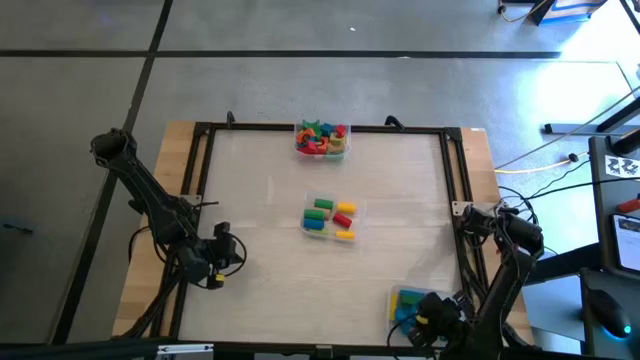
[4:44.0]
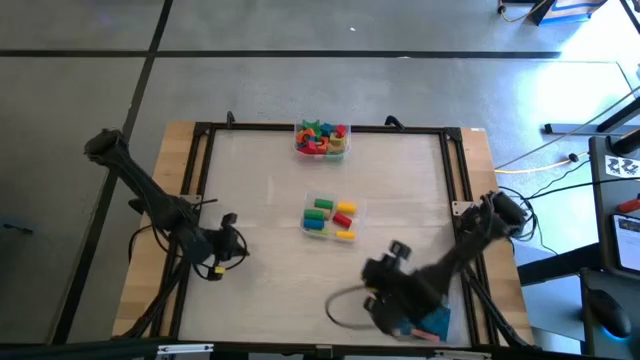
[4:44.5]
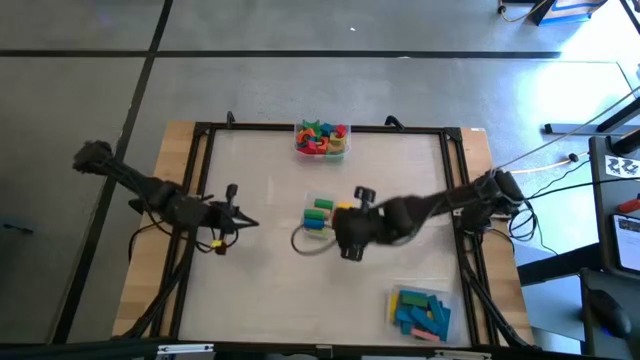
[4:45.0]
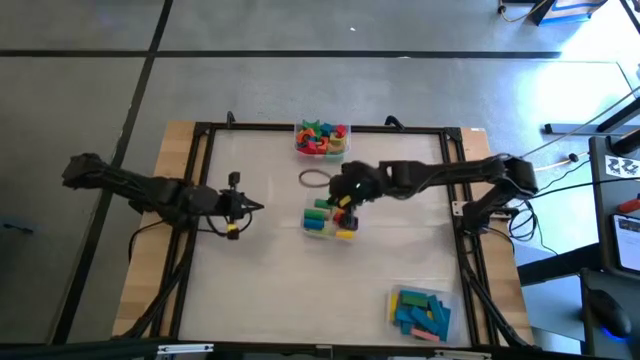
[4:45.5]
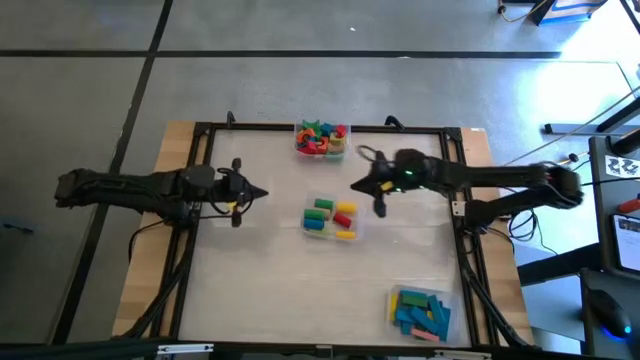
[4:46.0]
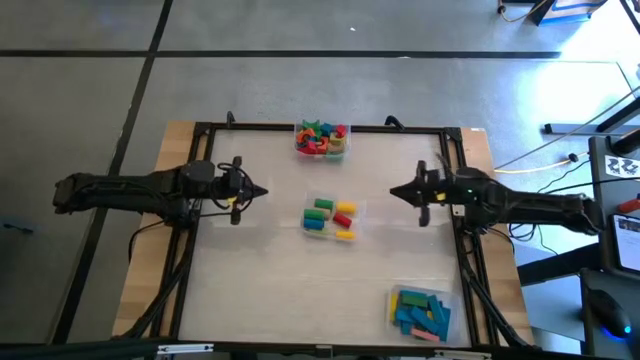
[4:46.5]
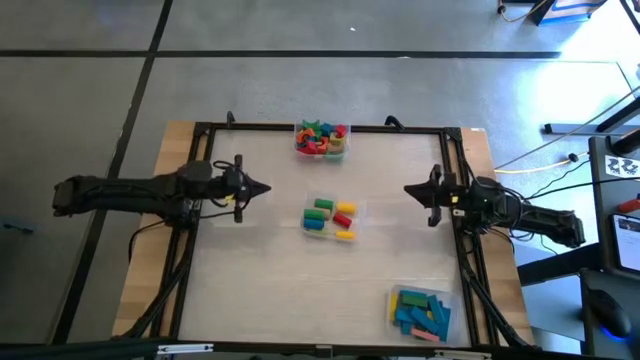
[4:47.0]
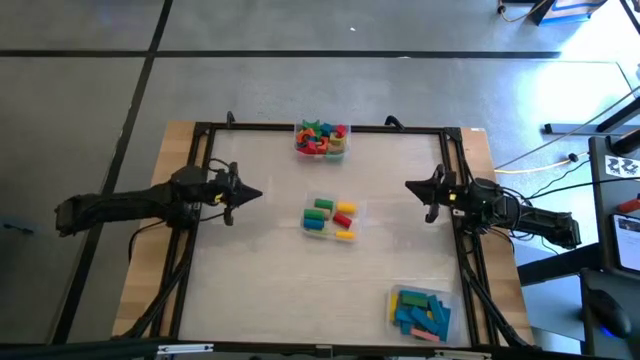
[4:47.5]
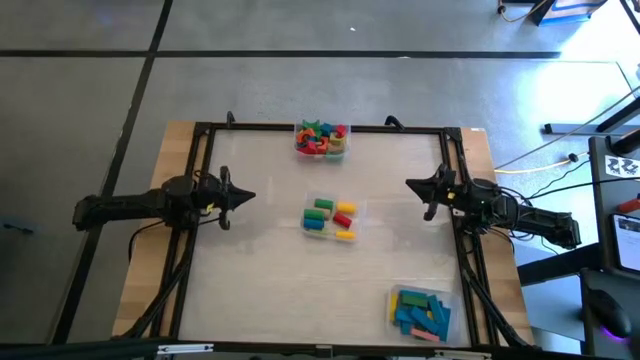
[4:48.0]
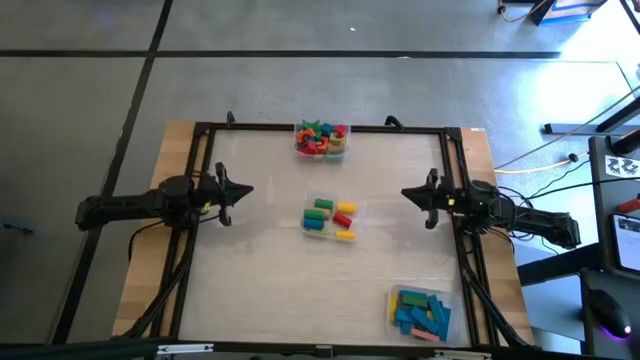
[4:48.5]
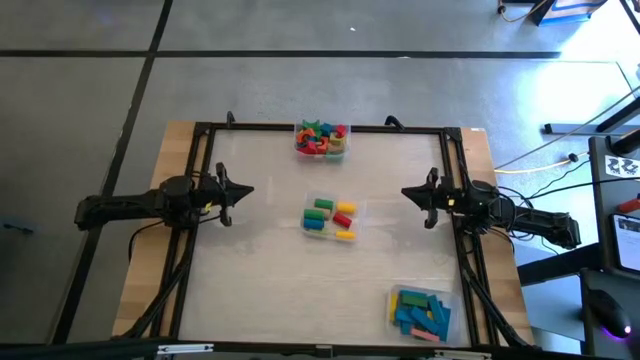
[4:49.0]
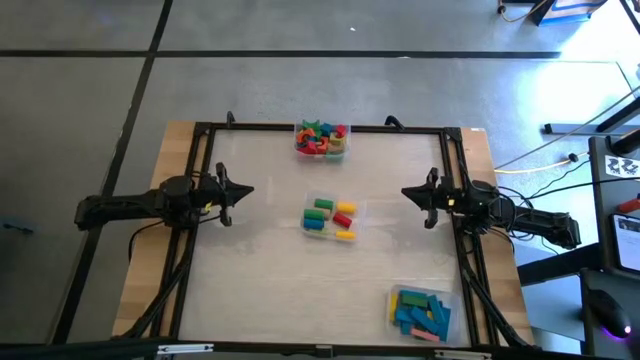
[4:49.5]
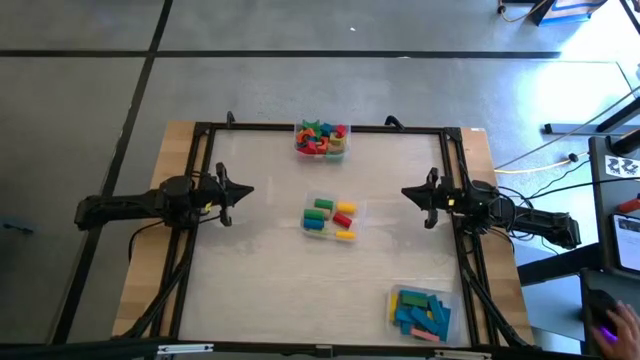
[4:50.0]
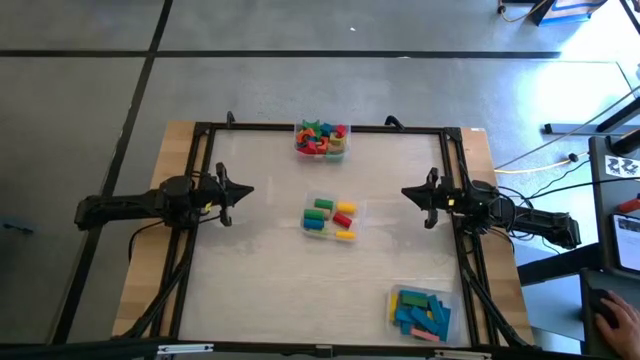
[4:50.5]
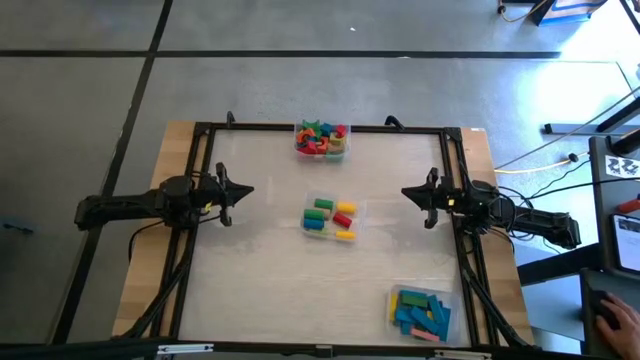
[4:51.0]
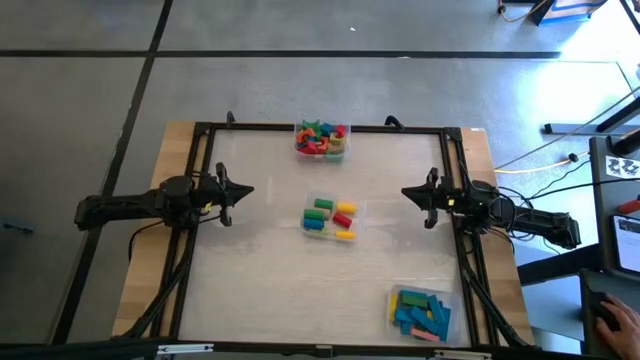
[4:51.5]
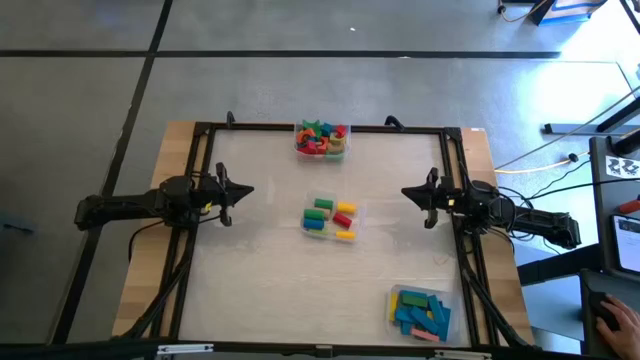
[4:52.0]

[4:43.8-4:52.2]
Task: Sort blocks by size
Return to Home Position

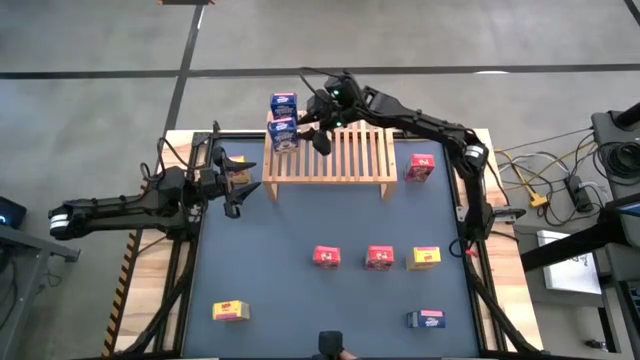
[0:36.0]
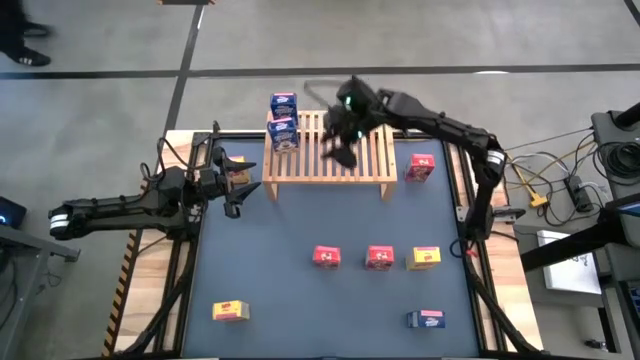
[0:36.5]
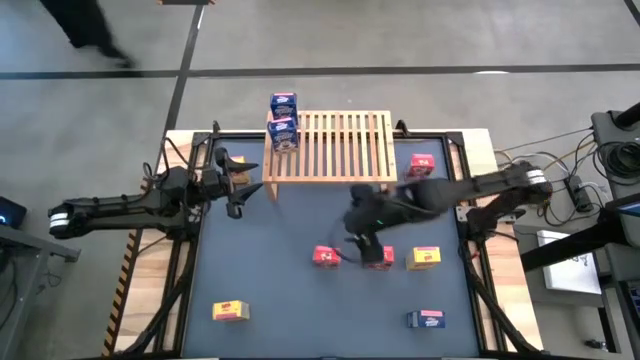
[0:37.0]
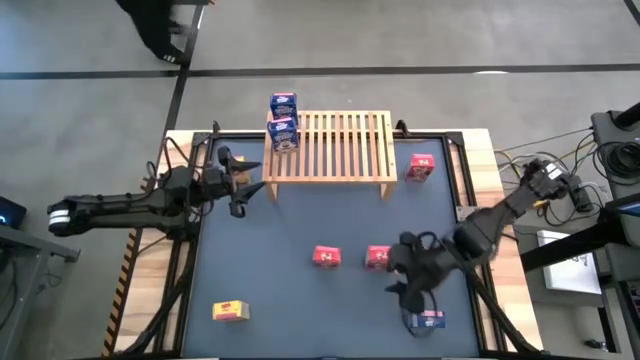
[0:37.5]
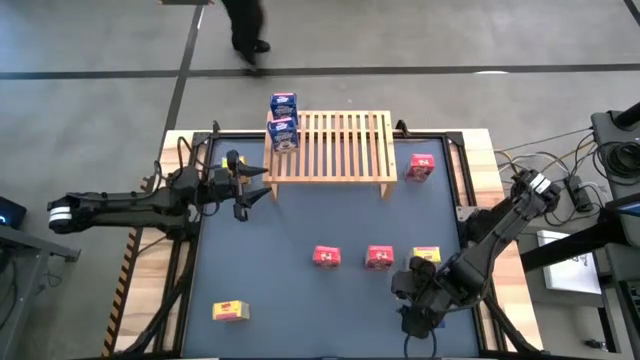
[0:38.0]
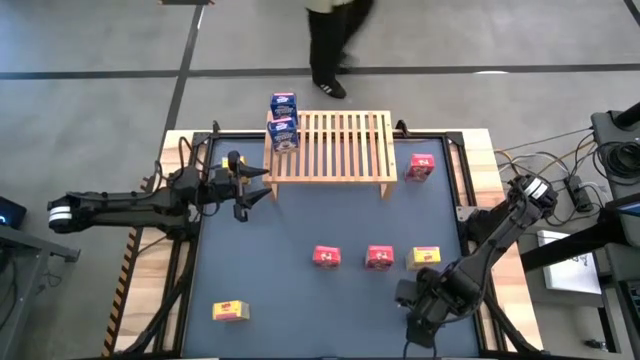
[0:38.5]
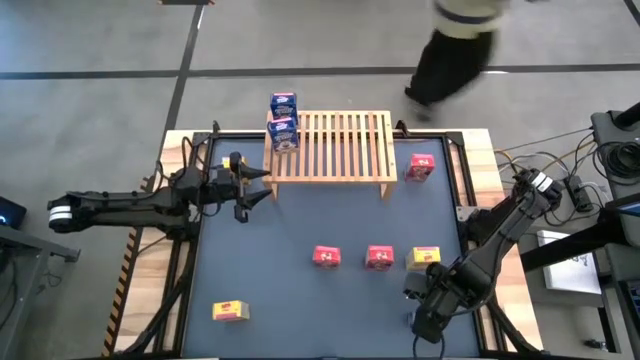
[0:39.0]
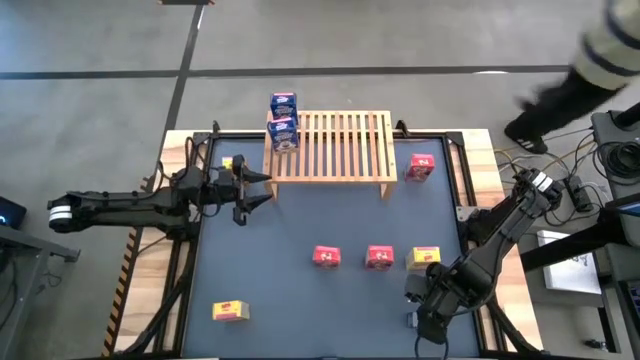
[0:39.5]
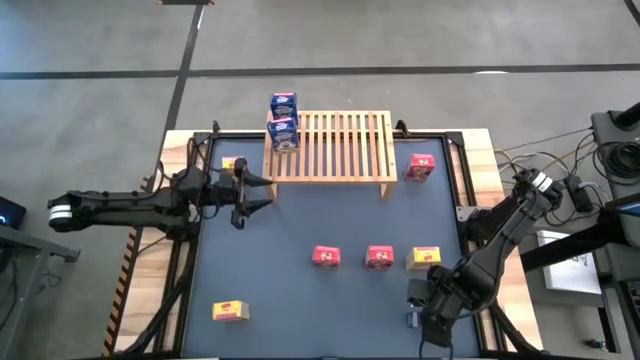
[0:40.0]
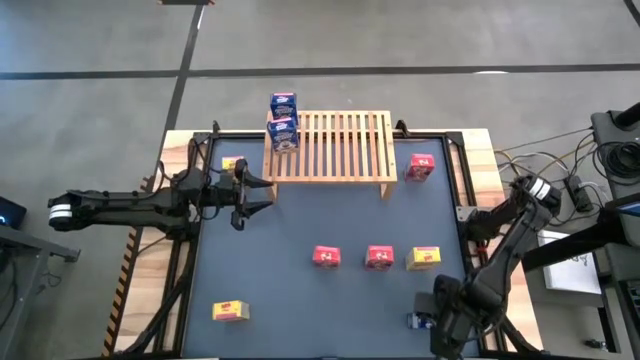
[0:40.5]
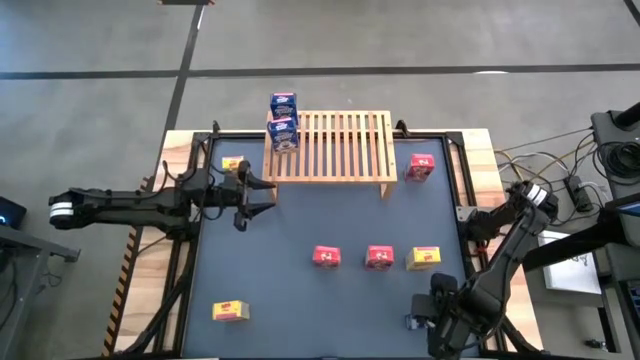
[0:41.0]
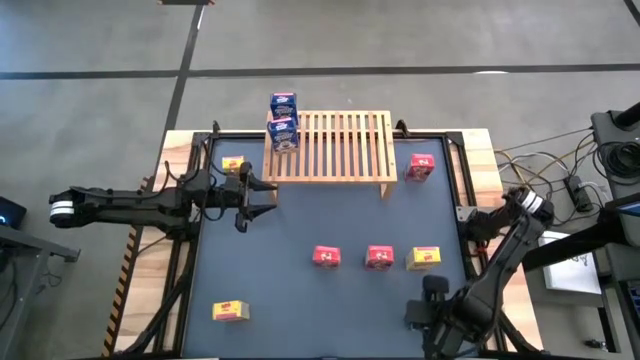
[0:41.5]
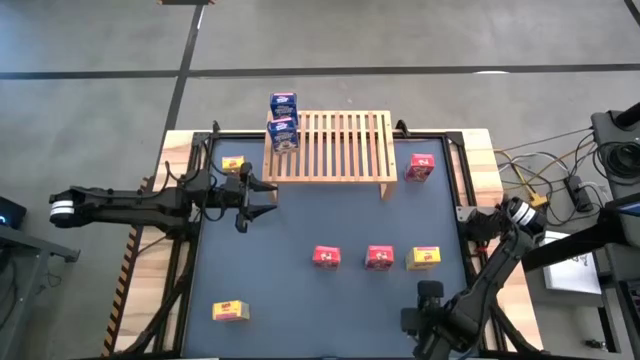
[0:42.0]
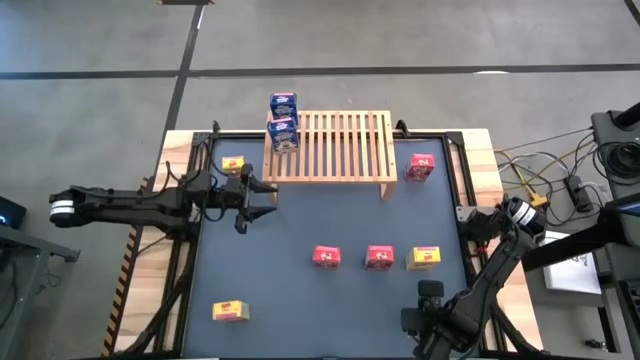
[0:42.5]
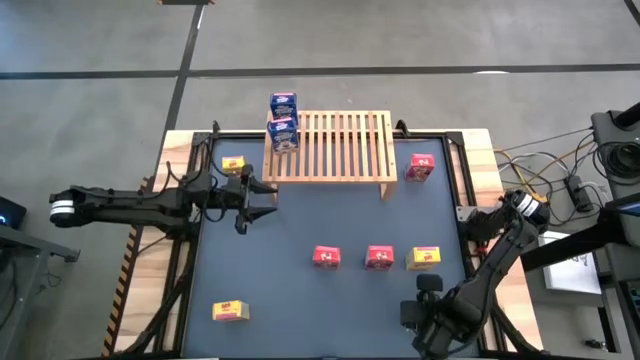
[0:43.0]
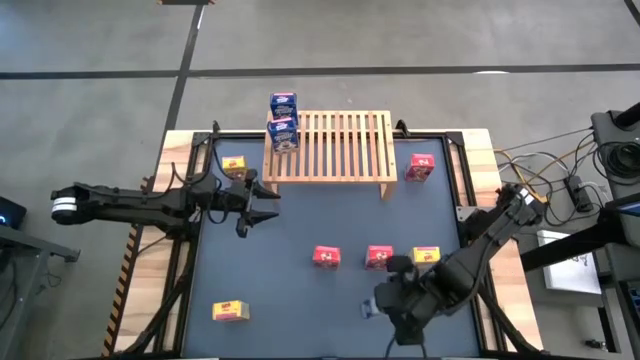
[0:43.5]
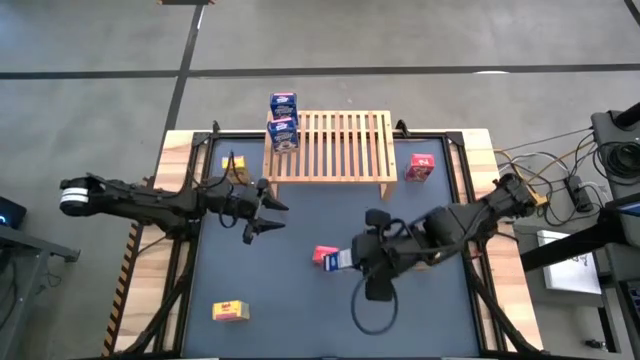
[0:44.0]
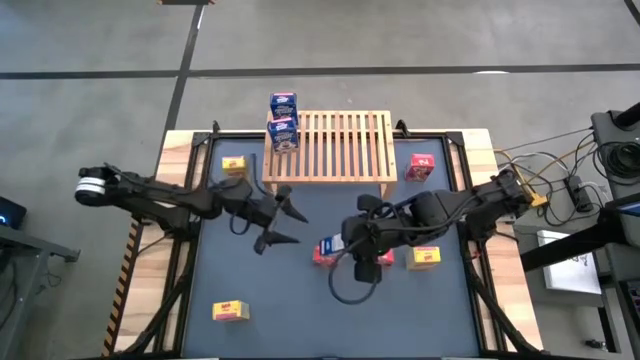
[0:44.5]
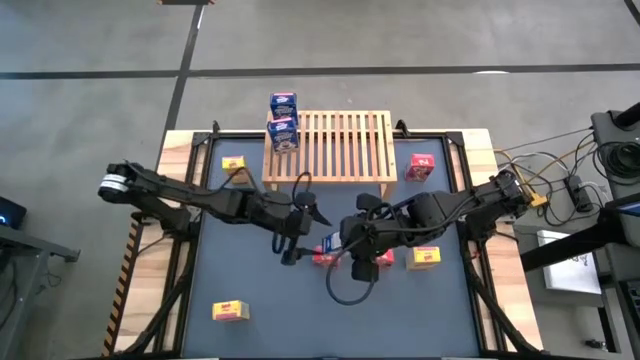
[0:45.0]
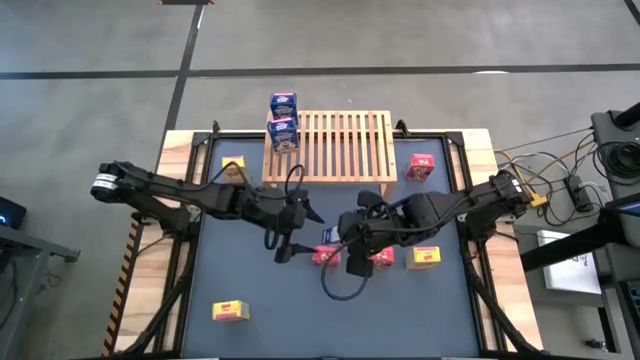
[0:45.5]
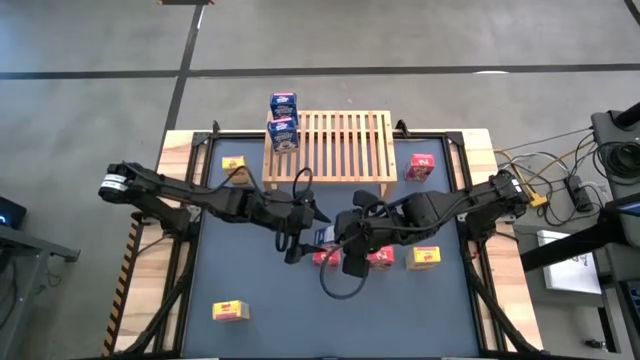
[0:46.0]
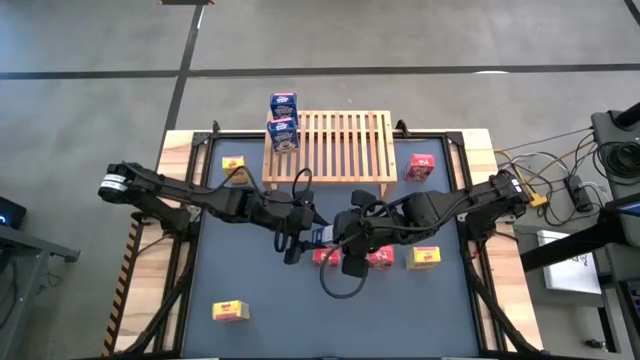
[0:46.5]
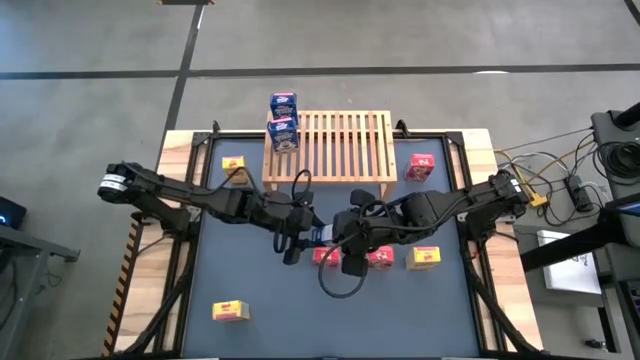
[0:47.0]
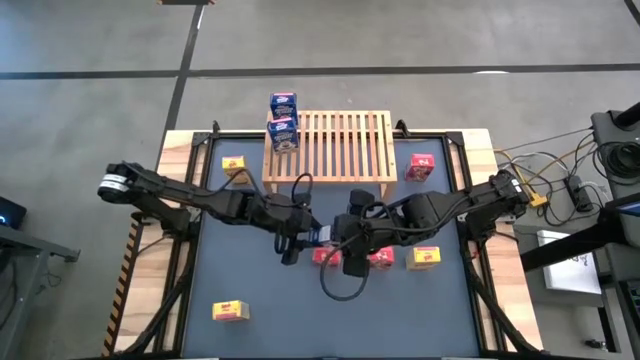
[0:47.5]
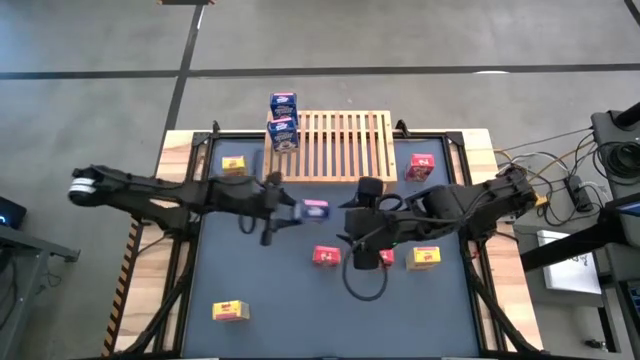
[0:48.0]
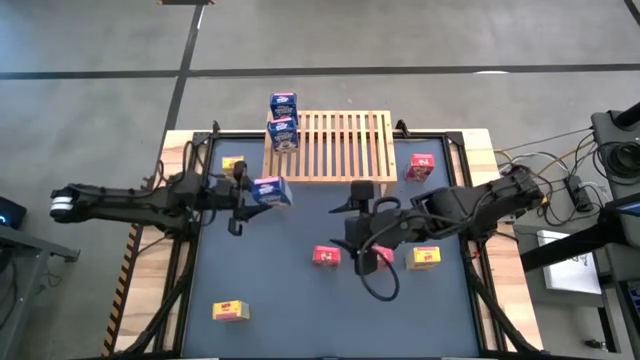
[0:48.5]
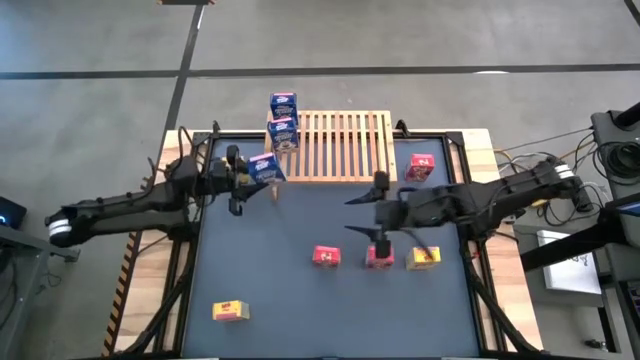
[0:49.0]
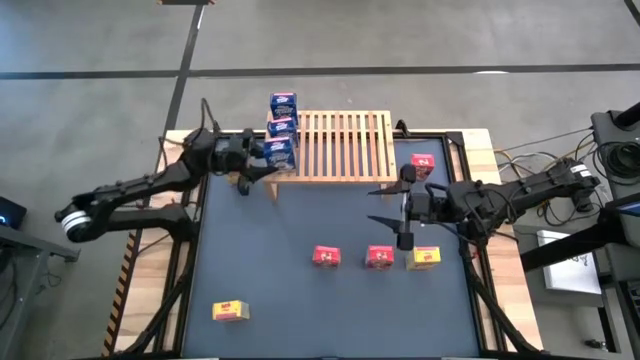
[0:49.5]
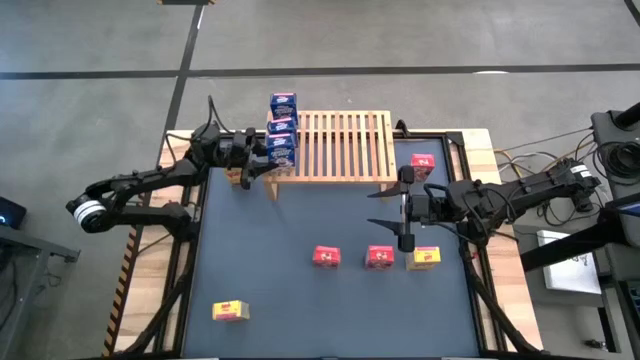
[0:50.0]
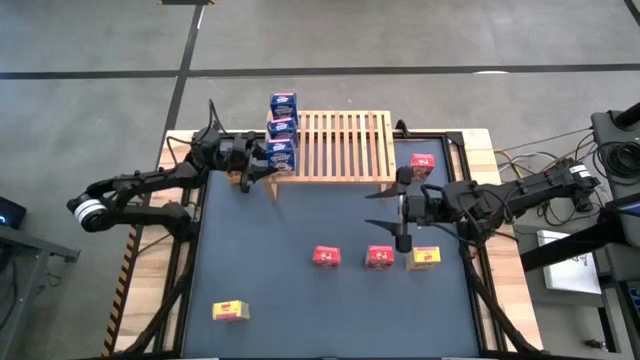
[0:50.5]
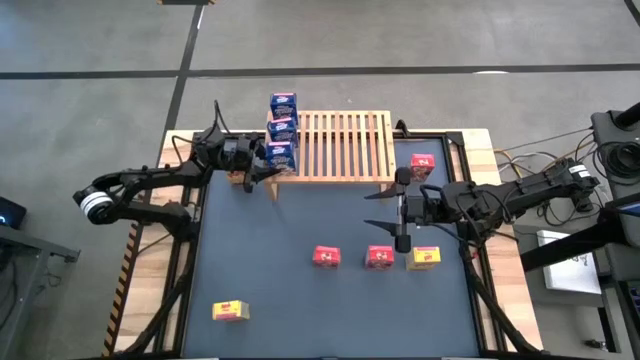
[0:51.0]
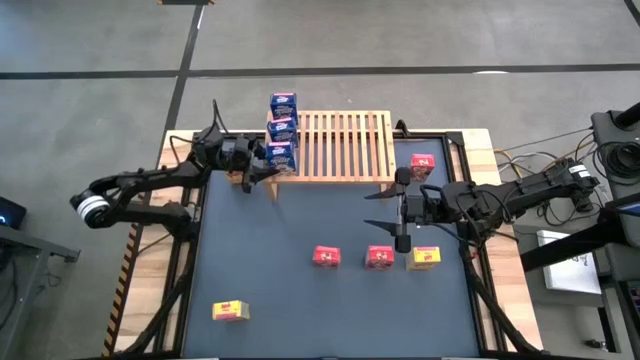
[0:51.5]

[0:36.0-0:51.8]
Task: Stack cereal on shelf
Put the blue cereal box on the shelf aligned with the other blue cereal box
